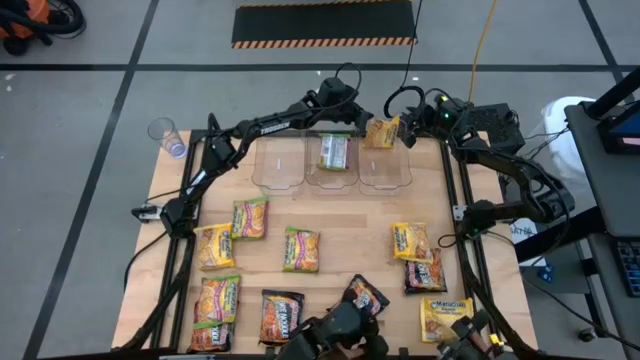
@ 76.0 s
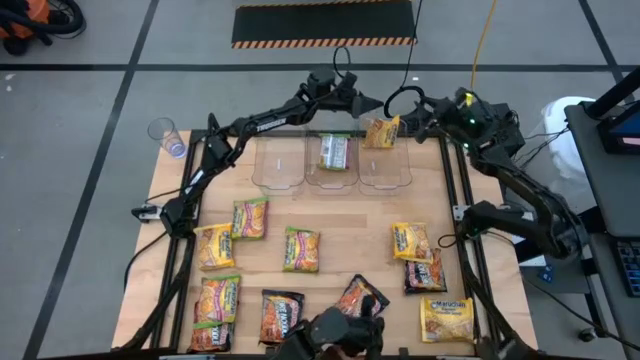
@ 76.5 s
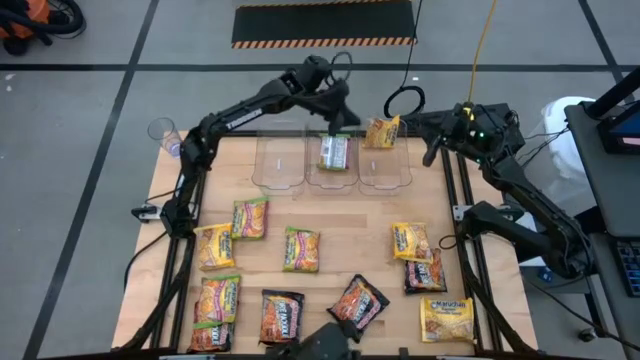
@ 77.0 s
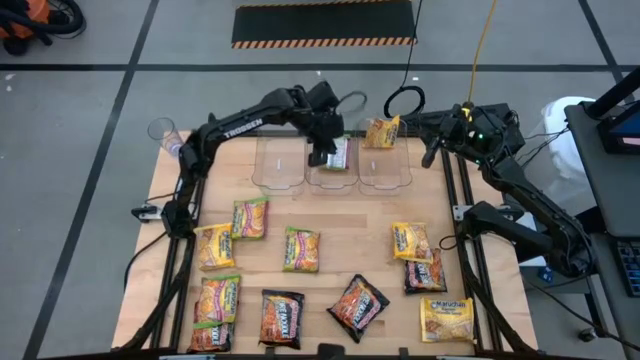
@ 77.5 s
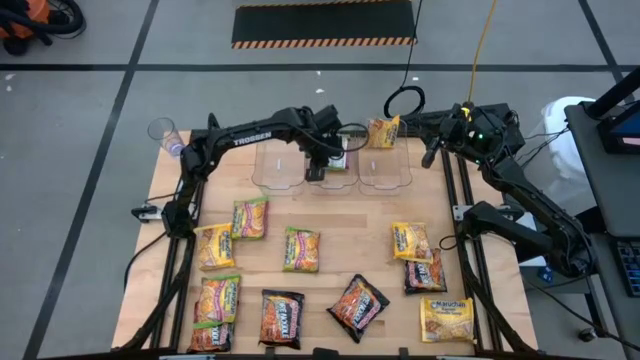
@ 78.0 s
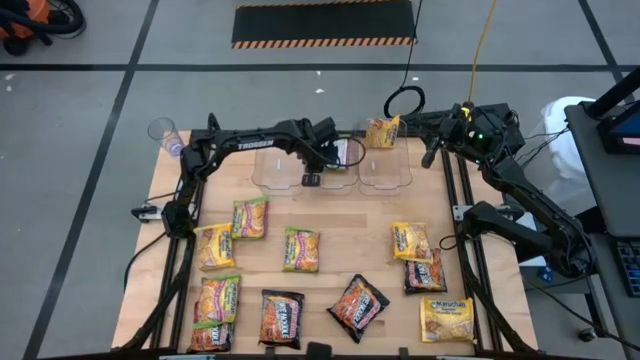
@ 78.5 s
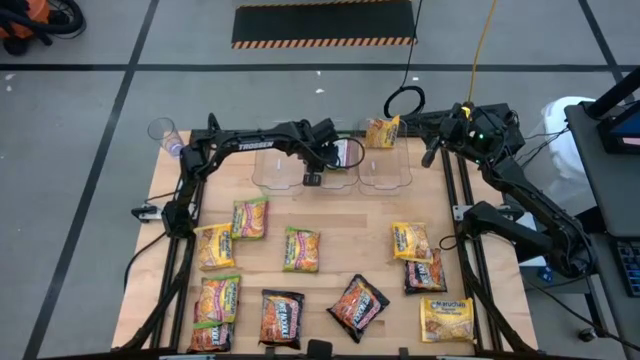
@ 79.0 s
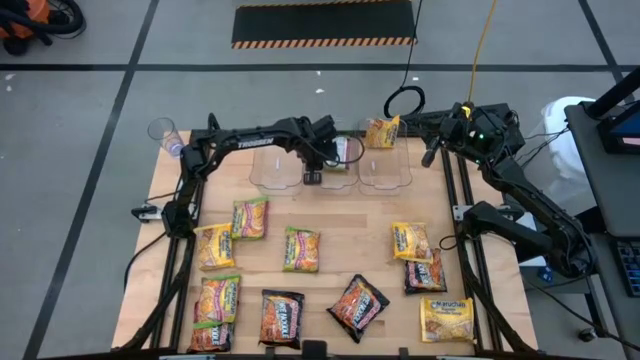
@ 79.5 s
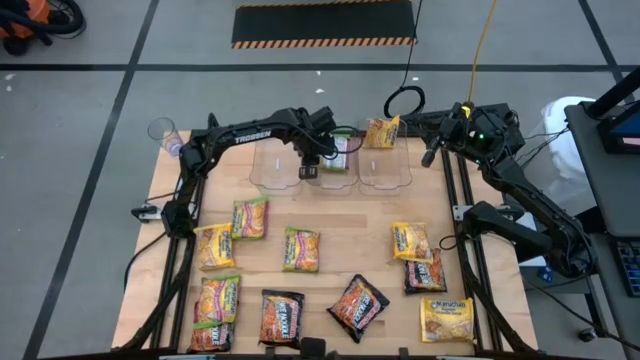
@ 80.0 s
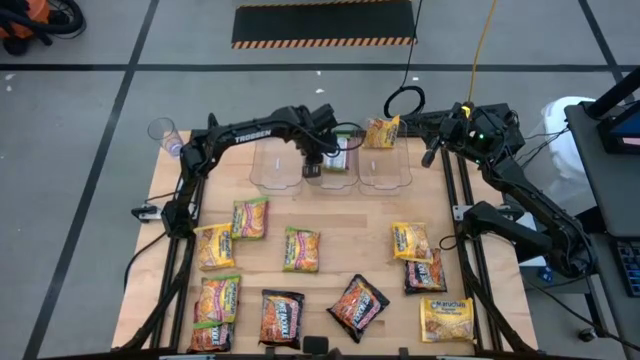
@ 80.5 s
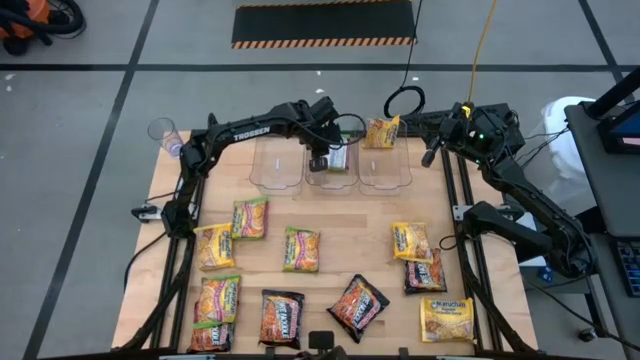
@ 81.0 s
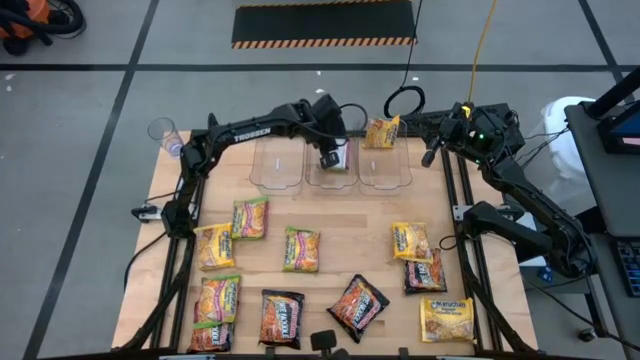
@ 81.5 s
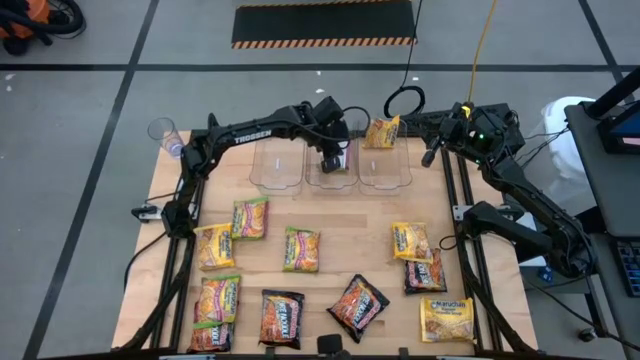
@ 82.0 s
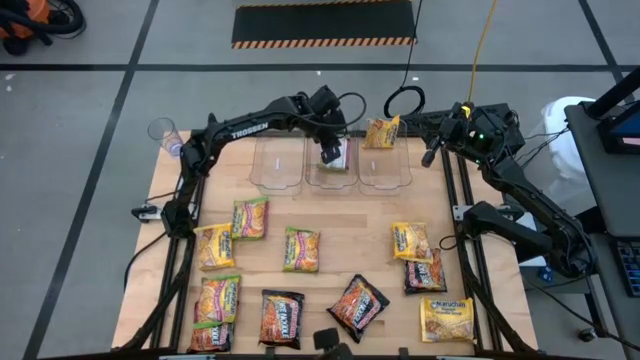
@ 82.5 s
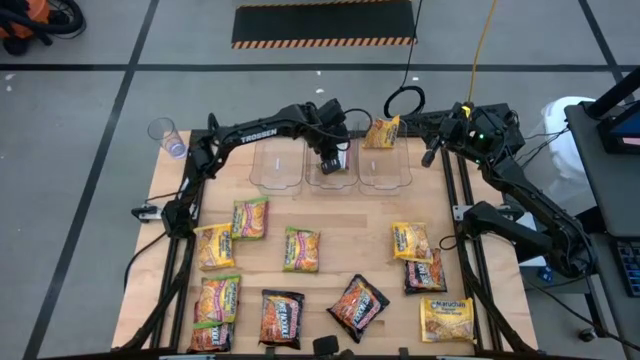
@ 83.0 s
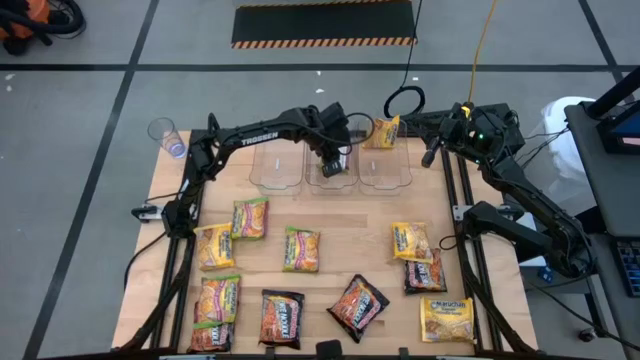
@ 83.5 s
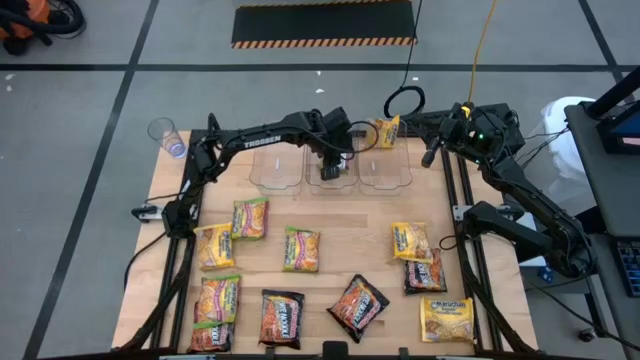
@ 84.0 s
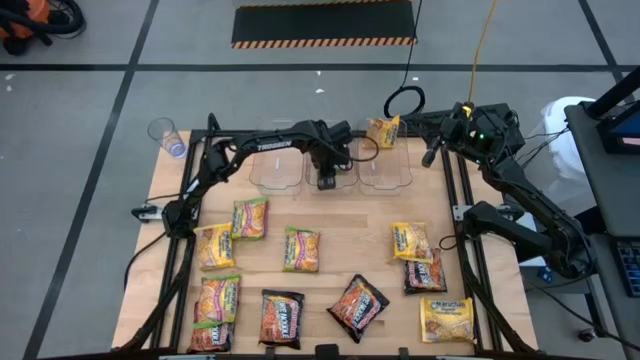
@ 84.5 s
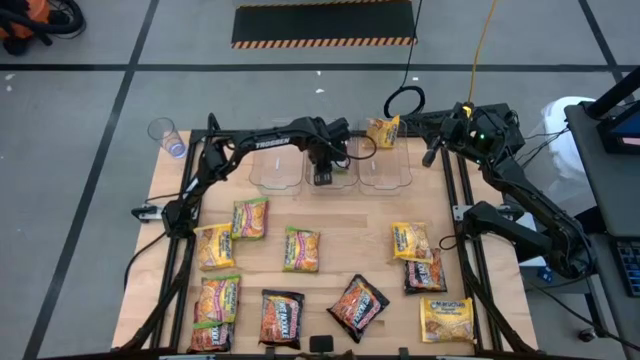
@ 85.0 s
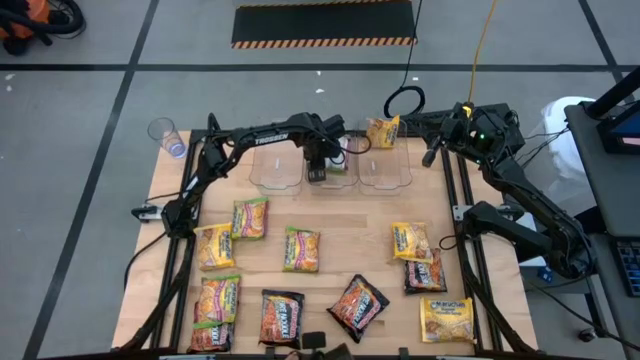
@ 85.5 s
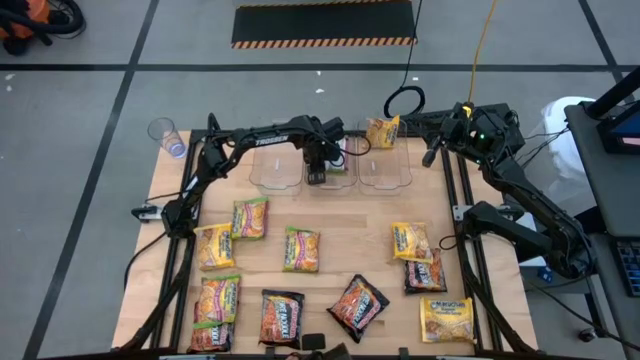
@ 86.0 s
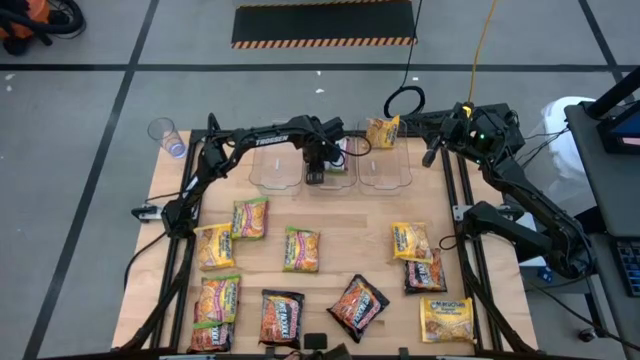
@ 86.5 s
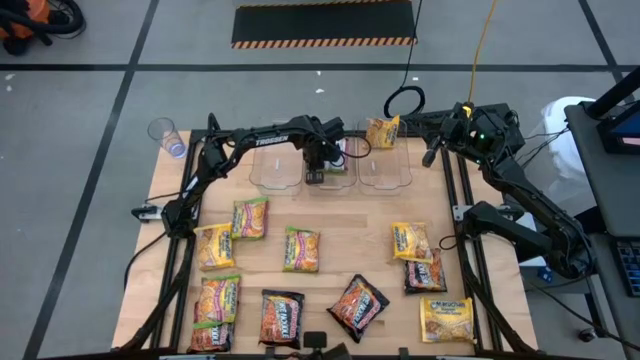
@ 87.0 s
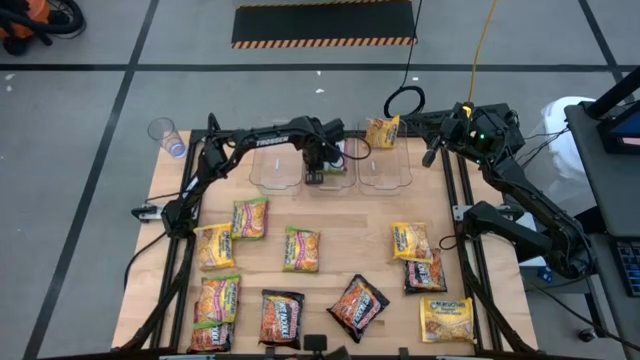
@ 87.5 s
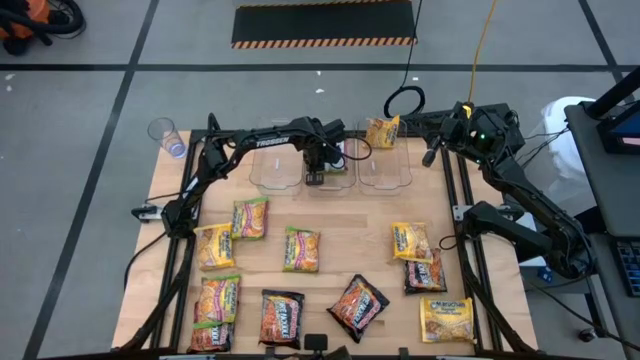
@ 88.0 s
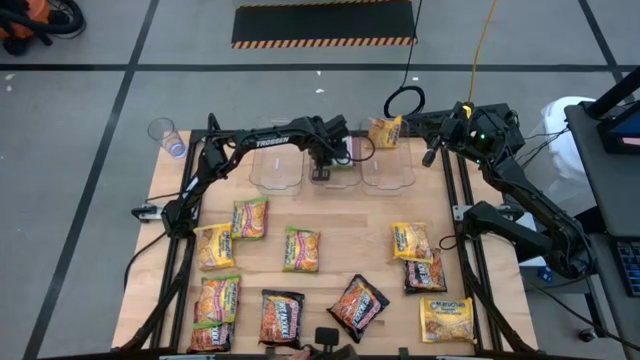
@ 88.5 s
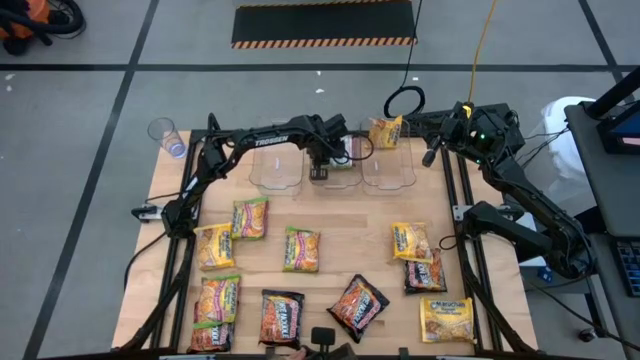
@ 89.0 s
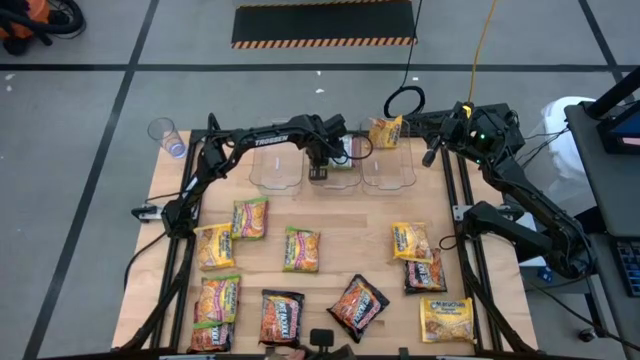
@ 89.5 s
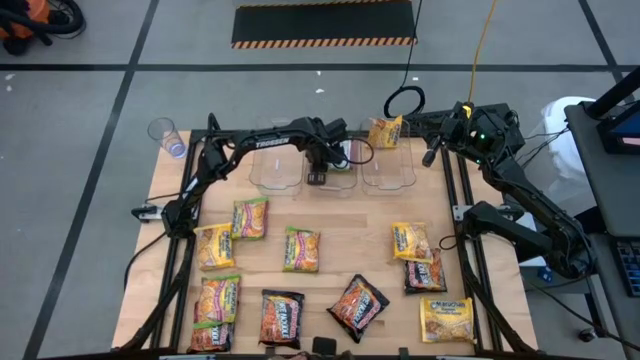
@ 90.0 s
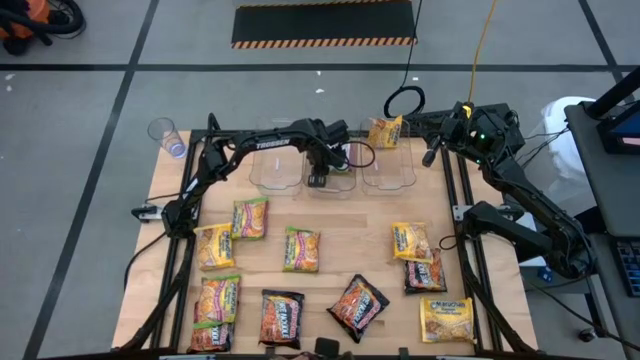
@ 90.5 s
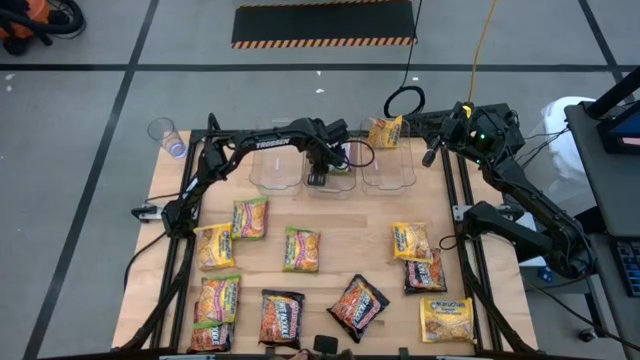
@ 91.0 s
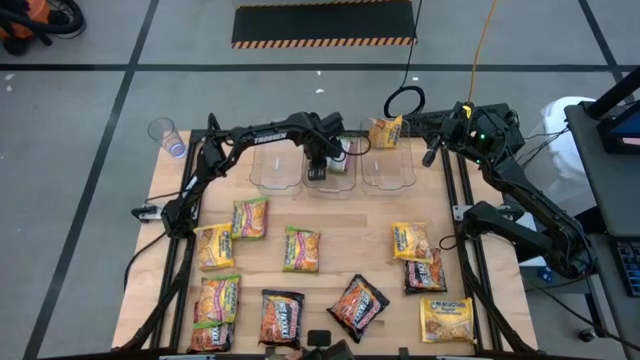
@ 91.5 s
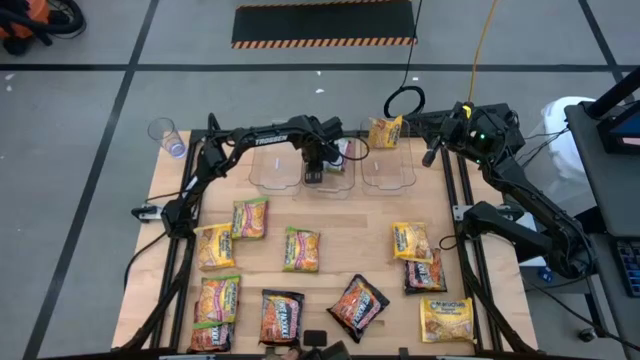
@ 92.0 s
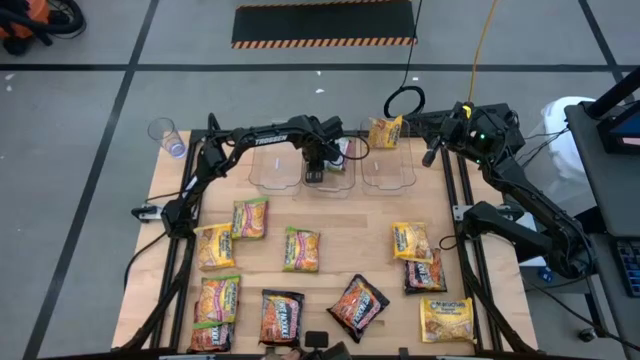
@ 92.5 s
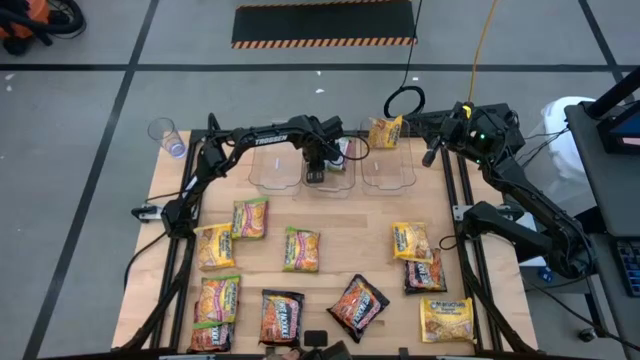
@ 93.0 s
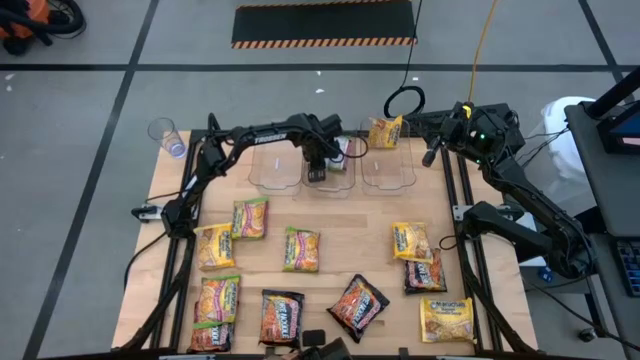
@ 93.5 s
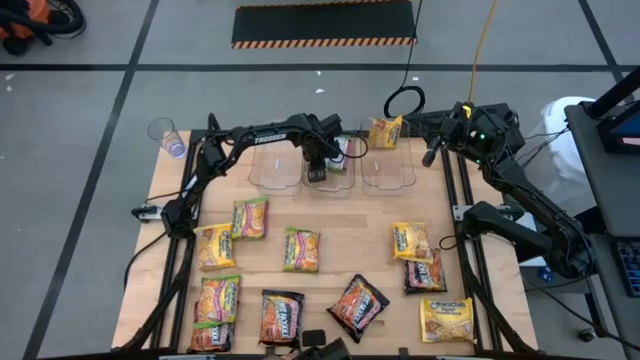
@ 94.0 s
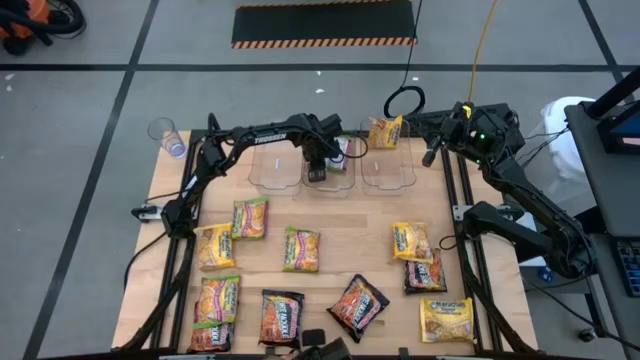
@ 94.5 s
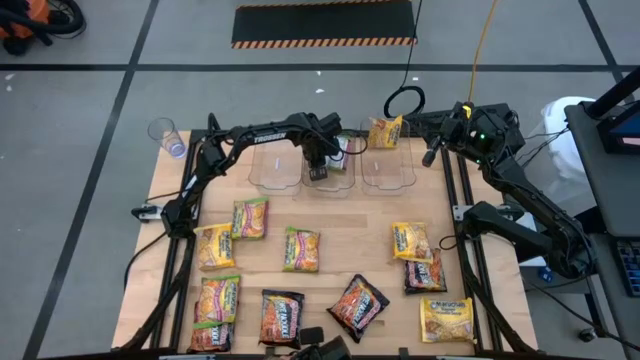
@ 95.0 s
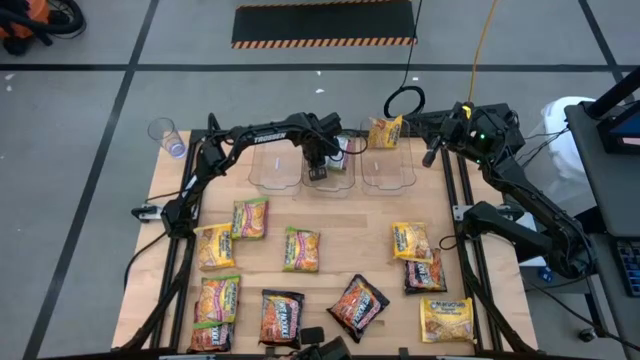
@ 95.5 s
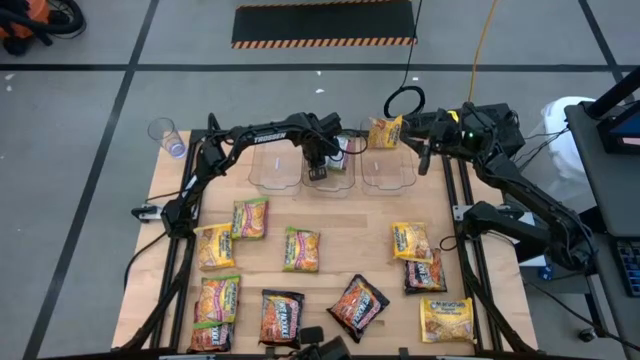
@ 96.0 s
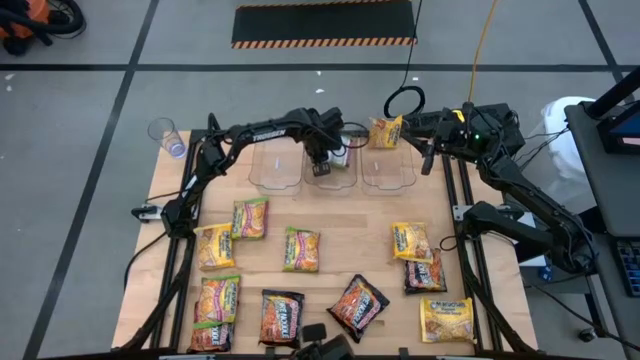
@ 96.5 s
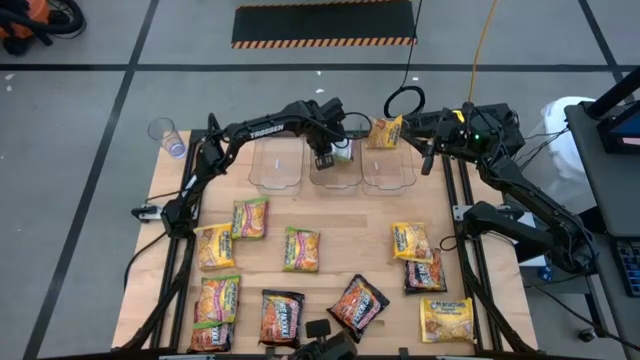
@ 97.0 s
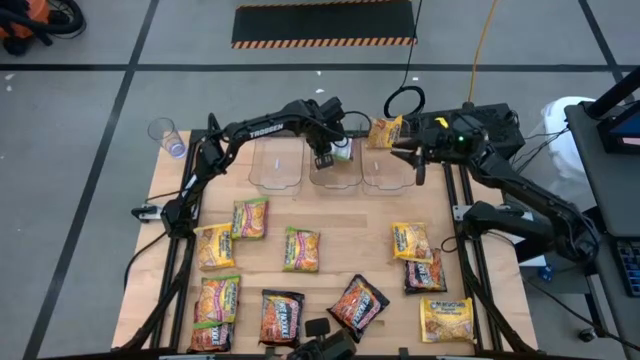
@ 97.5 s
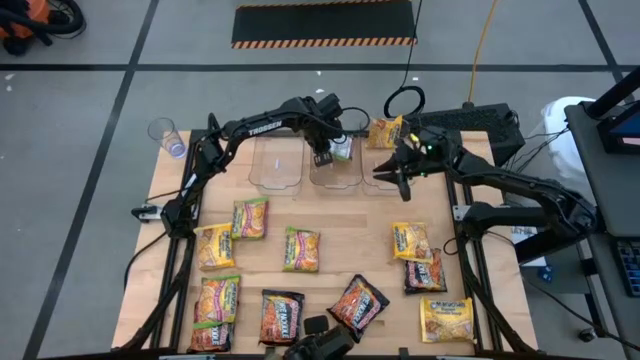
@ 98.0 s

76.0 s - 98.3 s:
Task: Sort Maruchan noodles
Adjust the green noodle pack in the center transparent bin
